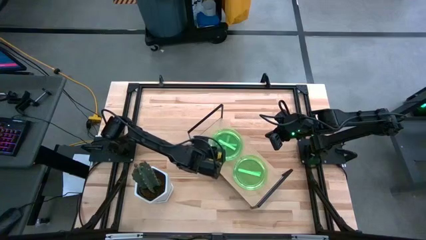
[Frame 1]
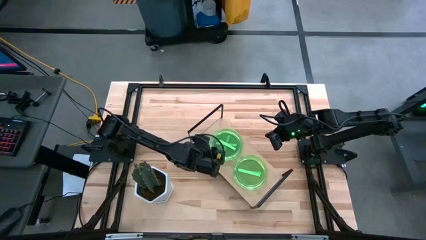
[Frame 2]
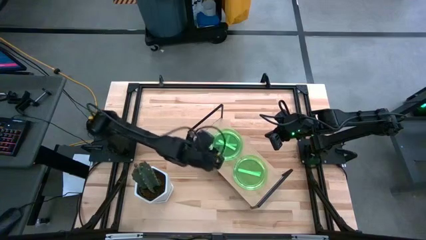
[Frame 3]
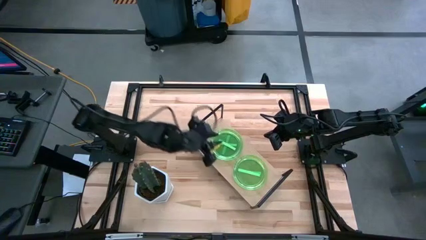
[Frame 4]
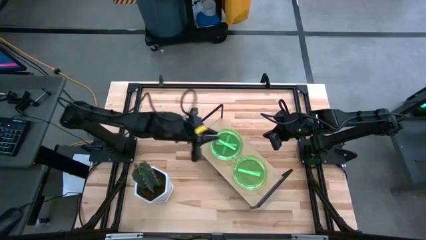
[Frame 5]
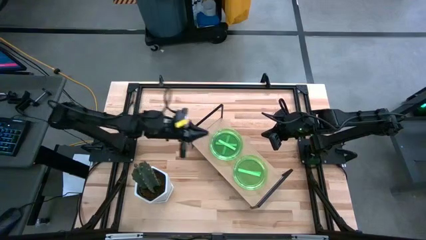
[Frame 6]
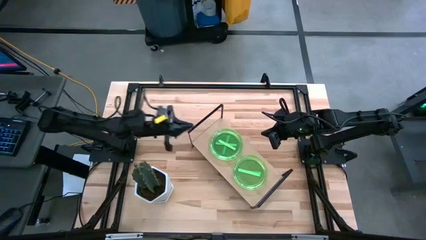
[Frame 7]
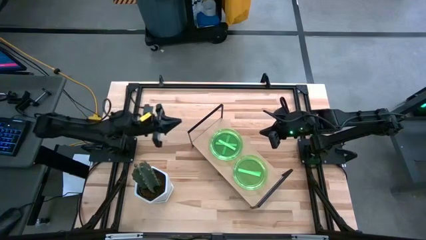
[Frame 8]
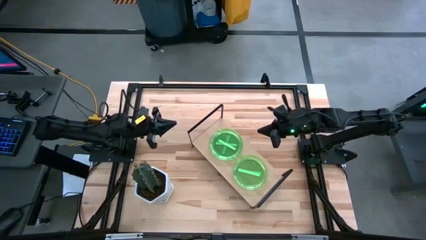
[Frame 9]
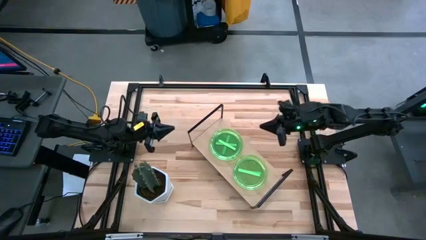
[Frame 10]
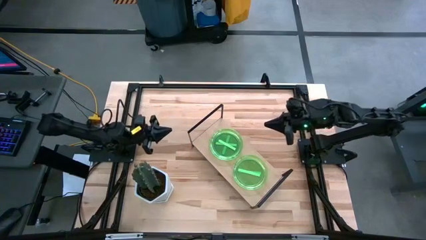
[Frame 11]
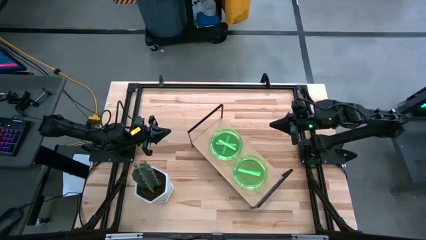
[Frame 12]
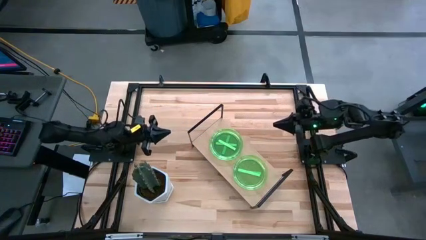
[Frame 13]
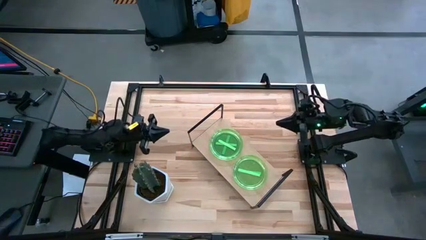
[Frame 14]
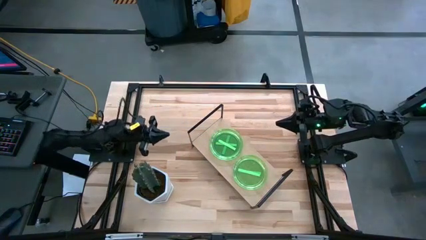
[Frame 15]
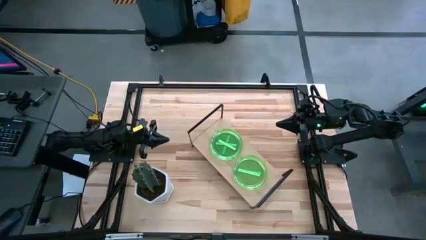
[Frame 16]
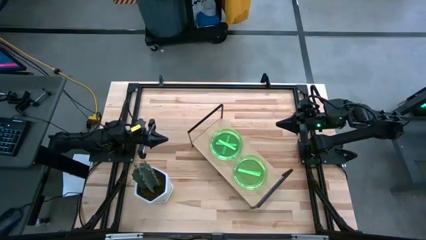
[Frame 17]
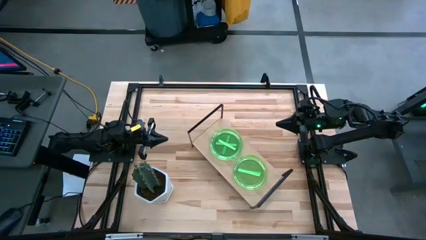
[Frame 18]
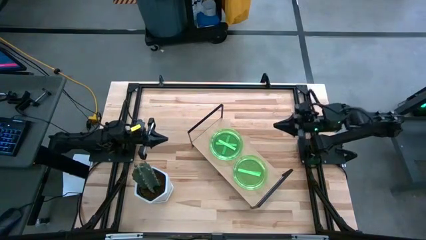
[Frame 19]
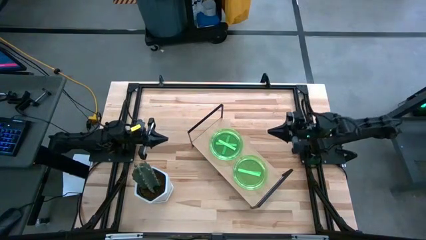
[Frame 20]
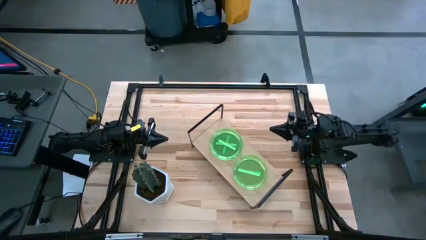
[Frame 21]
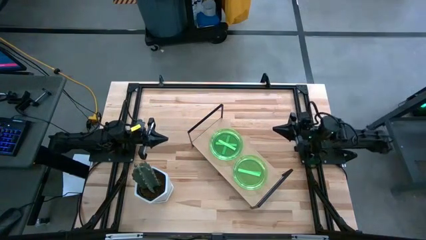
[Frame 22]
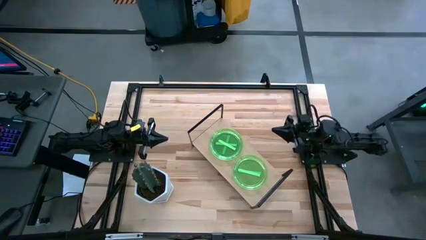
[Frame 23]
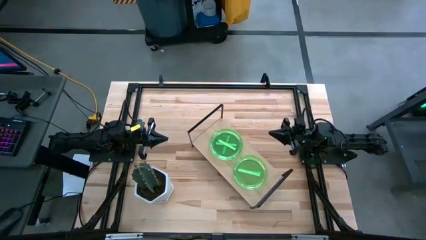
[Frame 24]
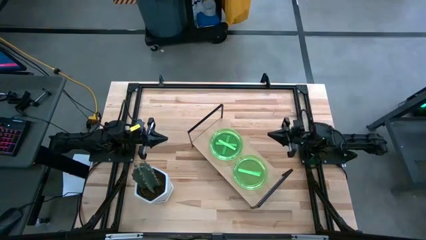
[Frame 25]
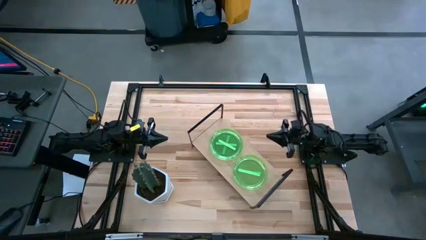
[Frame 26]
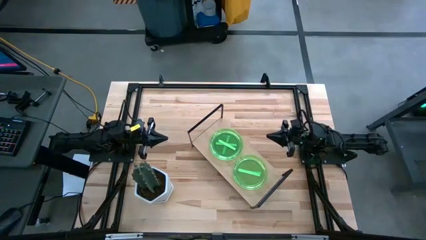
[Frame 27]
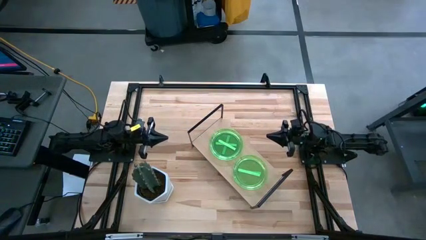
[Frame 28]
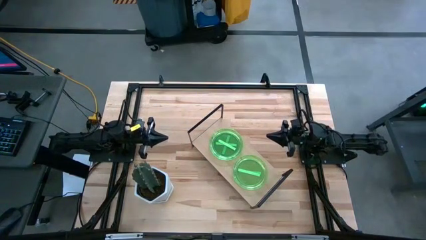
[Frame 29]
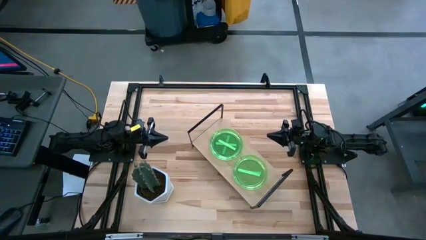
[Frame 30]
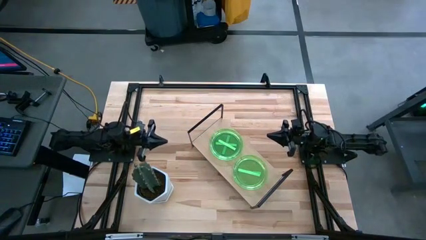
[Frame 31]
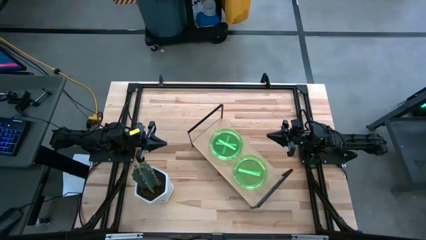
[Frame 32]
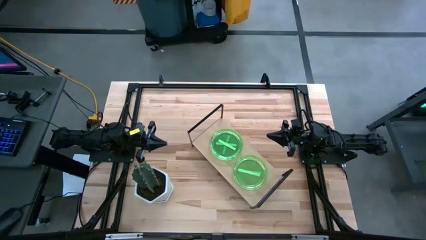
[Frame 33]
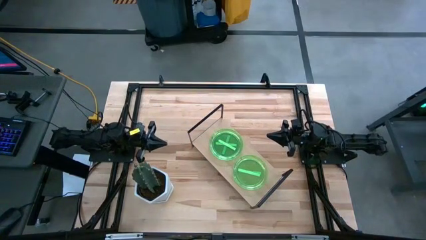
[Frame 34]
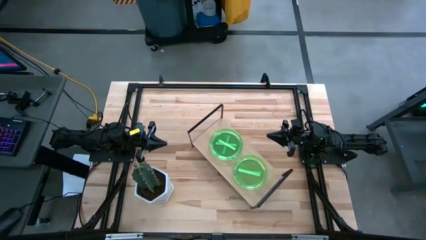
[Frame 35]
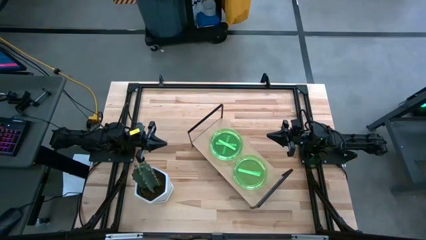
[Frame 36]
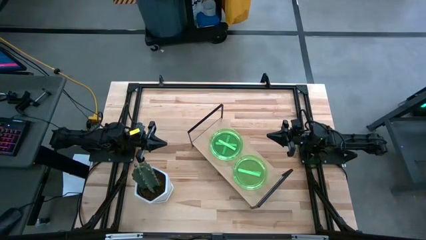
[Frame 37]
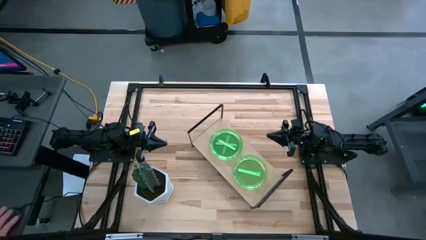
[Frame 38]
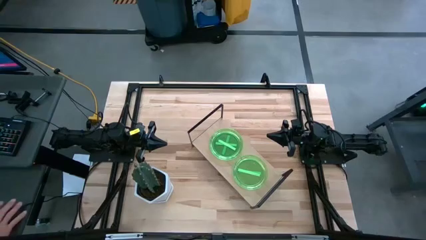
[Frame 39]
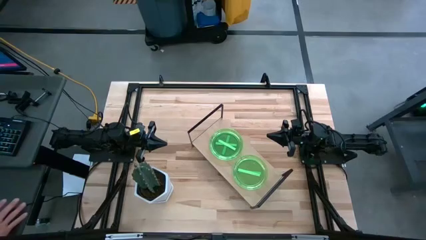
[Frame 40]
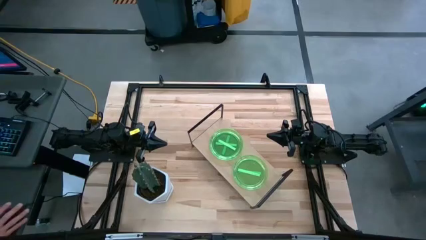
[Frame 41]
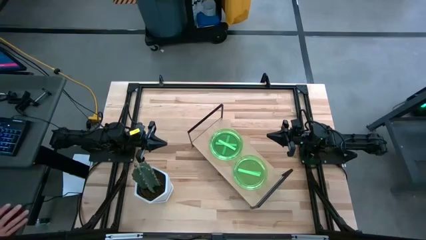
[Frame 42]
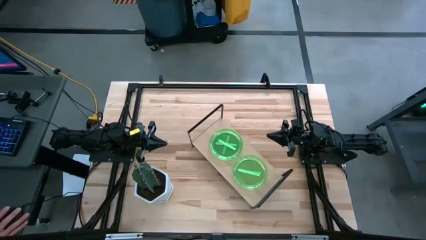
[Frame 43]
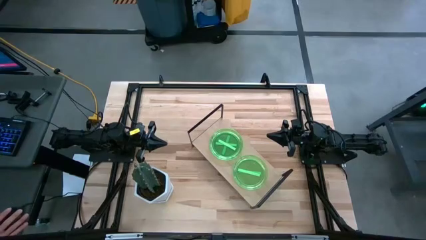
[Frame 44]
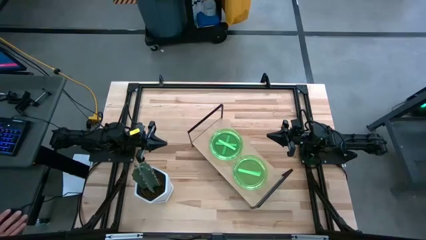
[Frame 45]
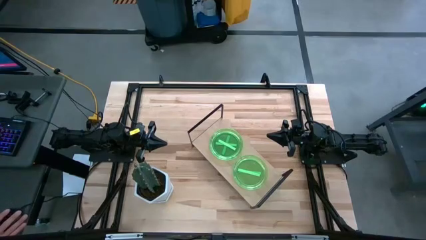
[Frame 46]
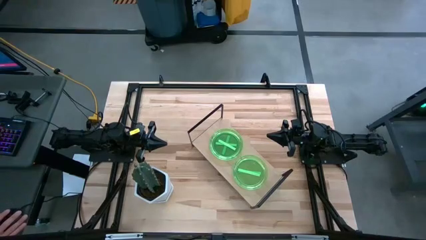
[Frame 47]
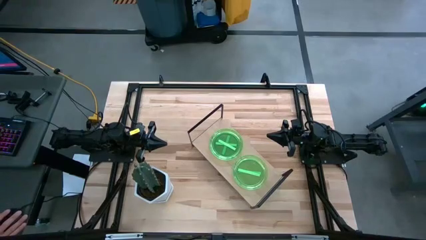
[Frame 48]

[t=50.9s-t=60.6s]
Task: Place and stack plates onto a shelf
Return to Home Position

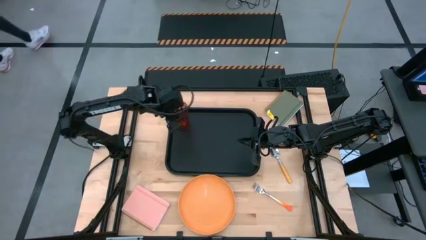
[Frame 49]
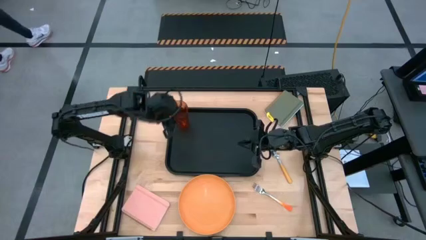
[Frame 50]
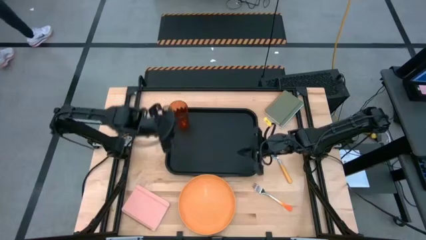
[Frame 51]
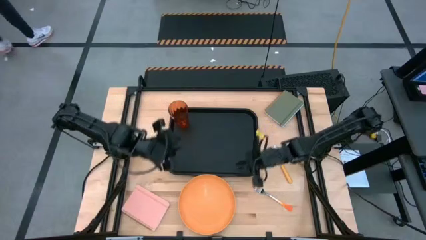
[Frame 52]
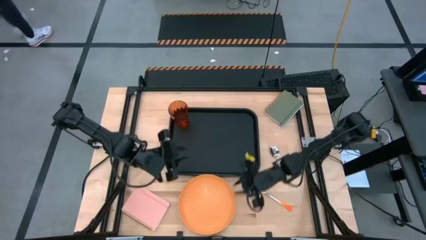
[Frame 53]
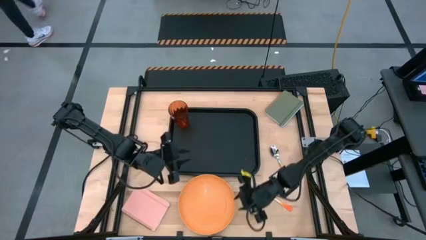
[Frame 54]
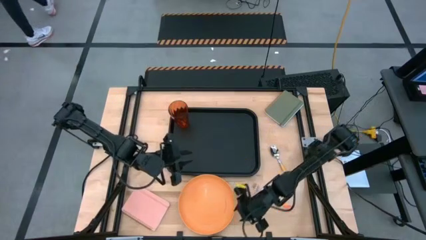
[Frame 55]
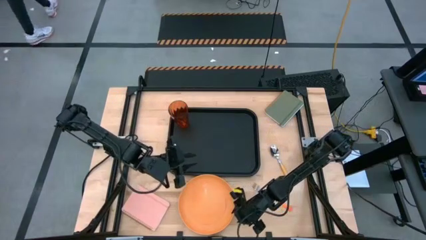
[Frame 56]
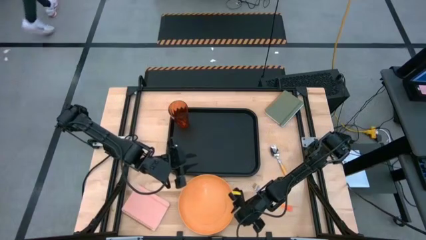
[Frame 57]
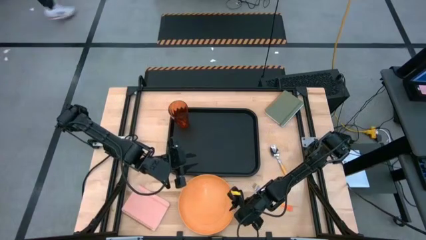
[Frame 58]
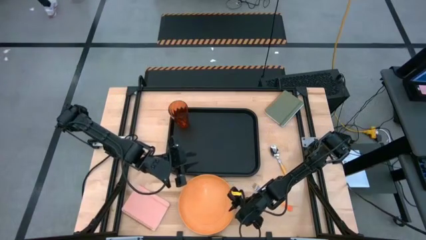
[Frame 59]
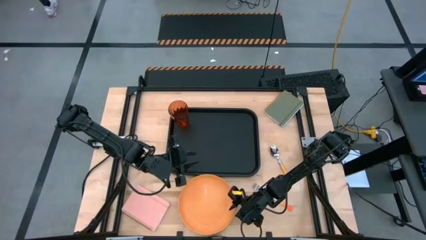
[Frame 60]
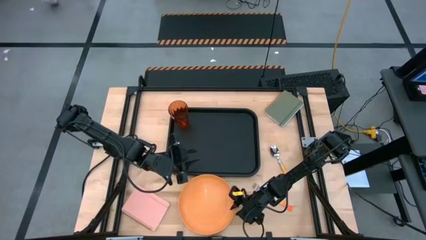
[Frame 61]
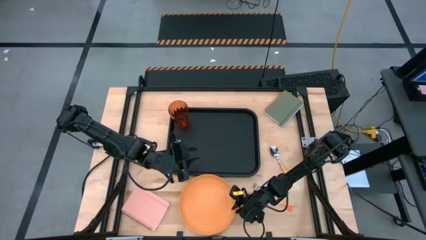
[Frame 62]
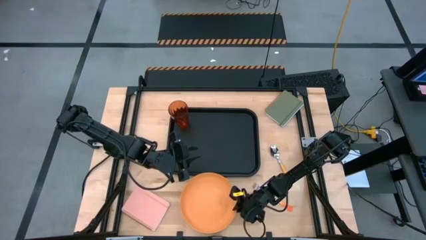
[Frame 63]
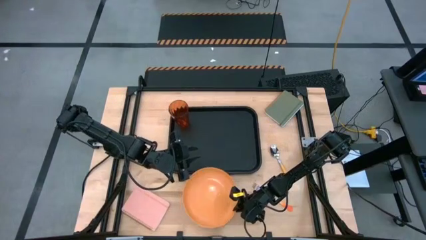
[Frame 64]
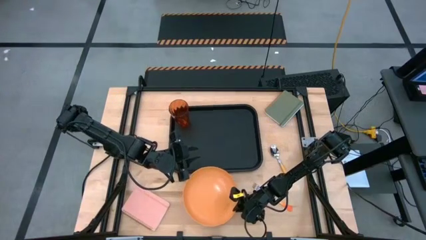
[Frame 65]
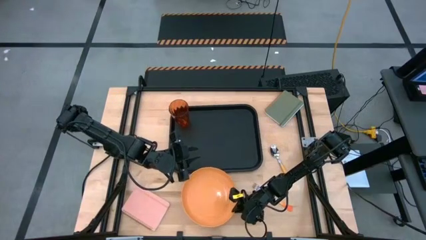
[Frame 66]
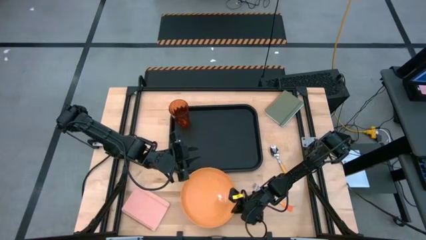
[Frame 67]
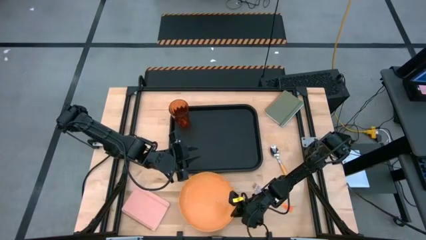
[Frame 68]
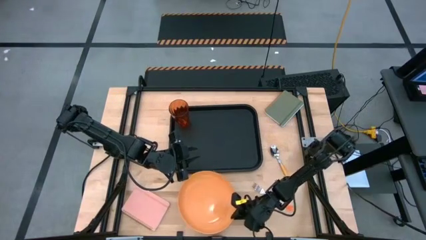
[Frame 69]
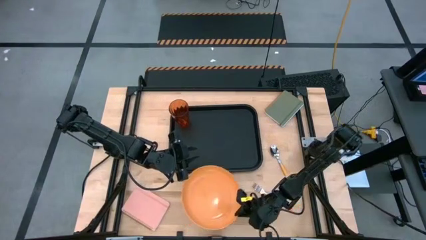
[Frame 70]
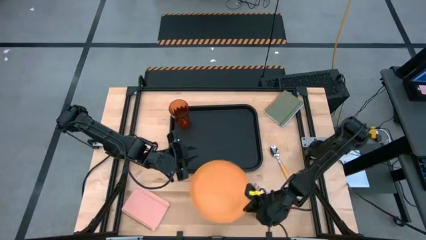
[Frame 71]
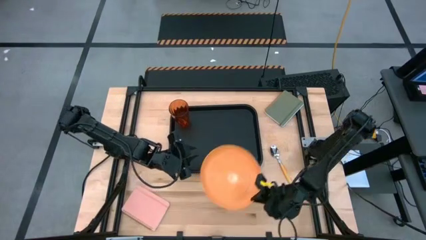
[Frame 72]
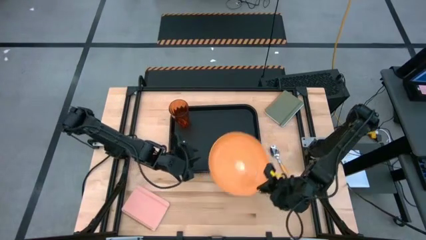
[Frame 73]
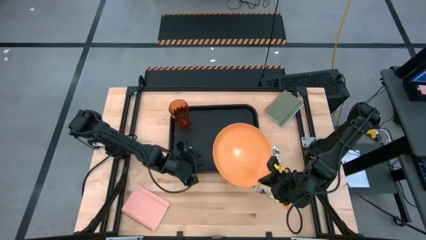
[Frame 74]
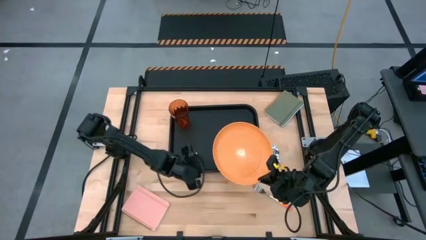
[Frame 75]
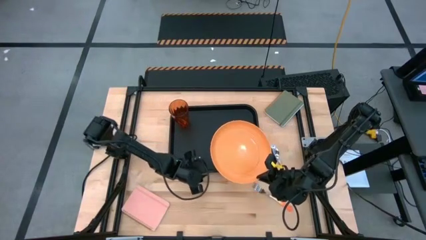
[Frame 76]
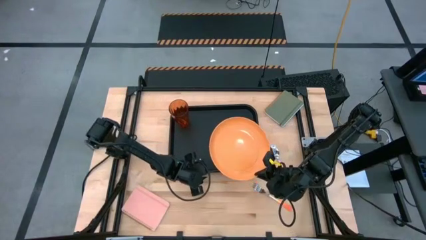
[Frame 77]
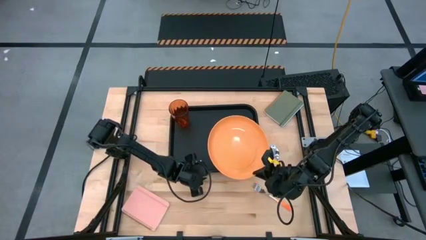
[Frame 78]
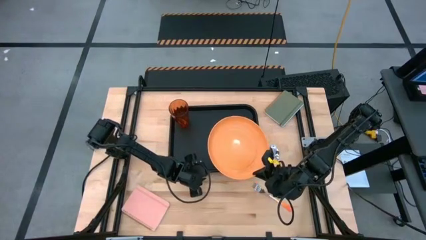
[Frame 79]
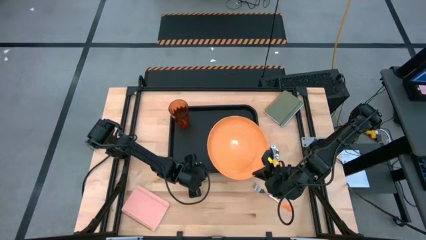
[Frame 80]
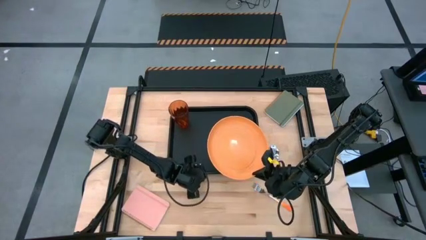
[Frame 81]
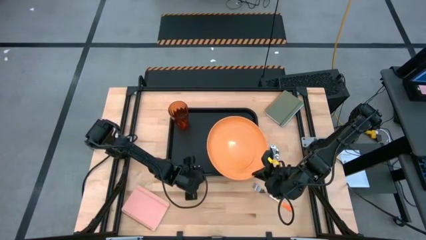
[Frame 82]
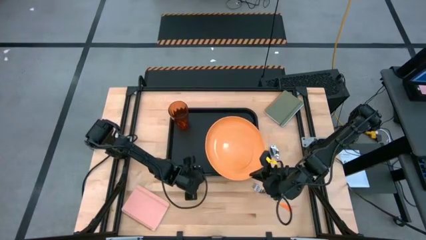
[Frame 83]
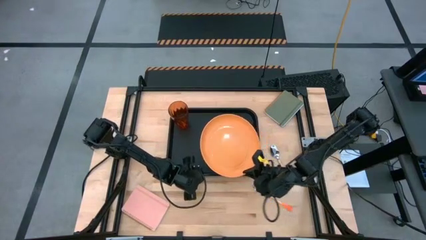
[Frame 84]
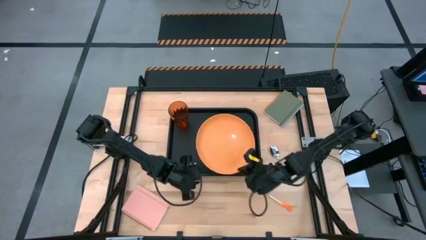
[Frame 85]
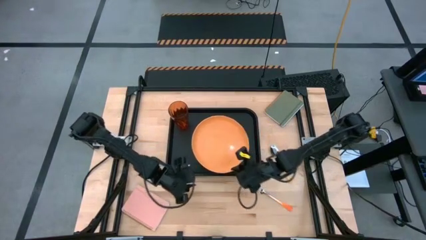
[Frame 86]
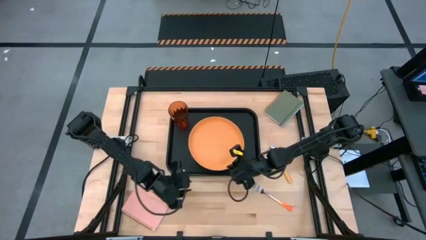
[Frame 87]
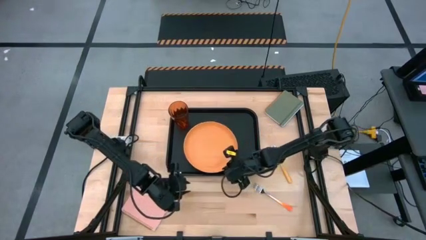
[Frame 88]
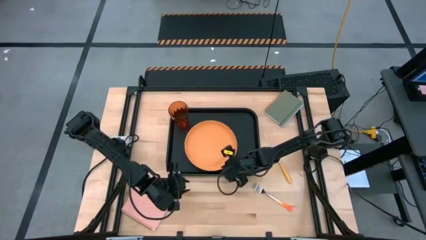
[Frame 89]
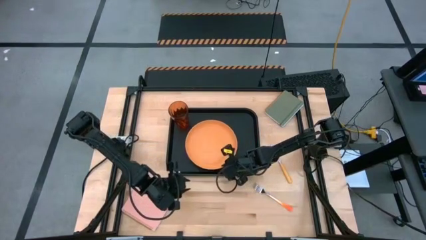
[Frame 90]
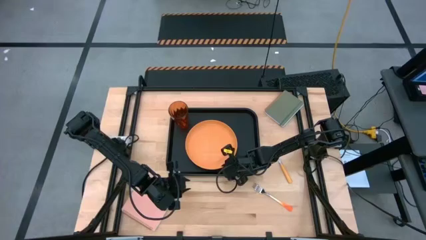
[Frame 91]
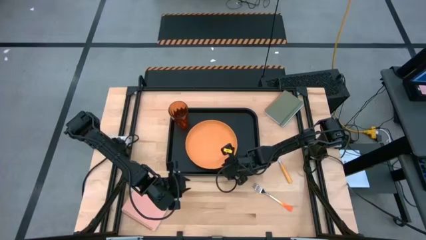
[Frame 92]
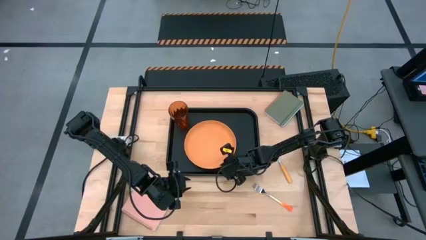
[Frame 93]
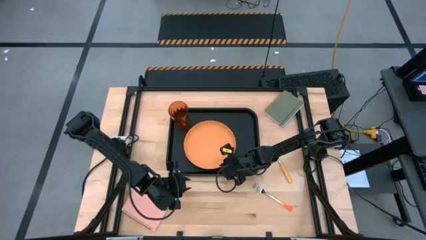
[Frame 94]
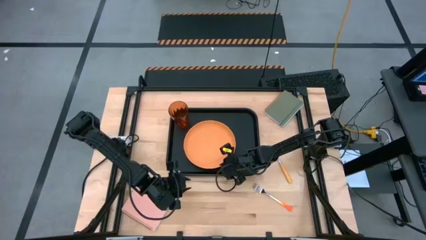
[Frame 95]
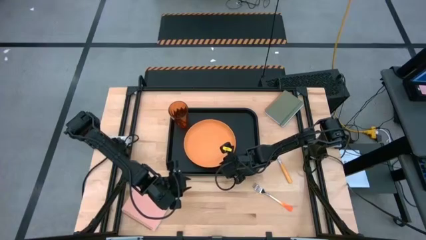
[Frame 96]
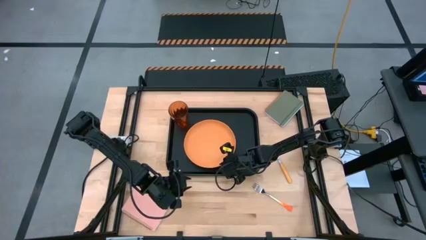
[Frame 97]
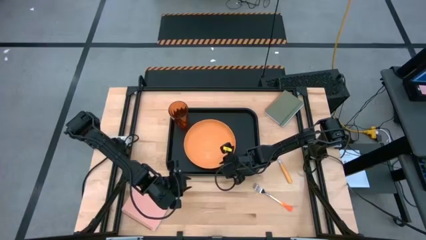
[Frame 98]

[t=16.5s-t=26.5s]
Task: Pick and place plate/cup/fork/spoon on tray
Put the orange plate on the black tray to the bottom right of the red cup
